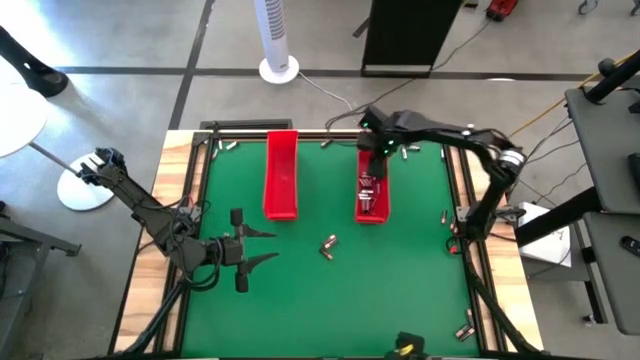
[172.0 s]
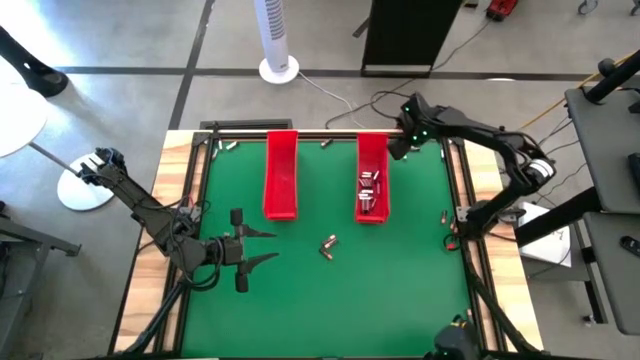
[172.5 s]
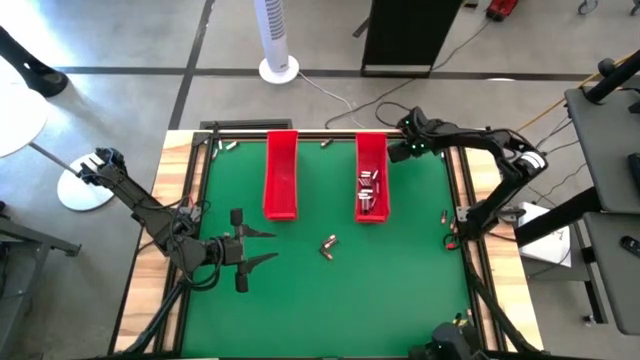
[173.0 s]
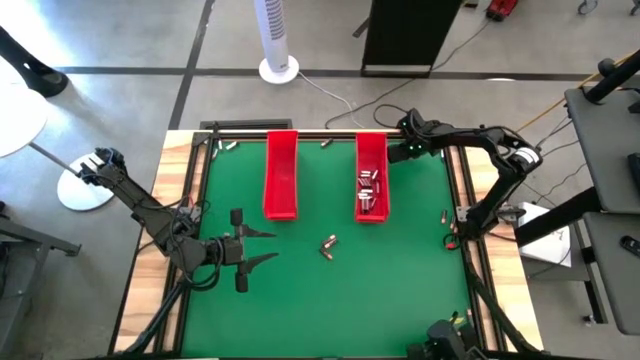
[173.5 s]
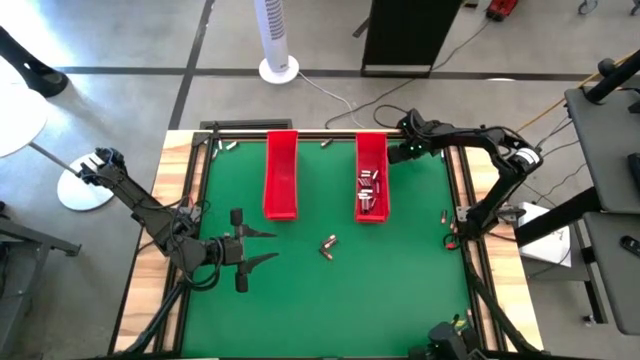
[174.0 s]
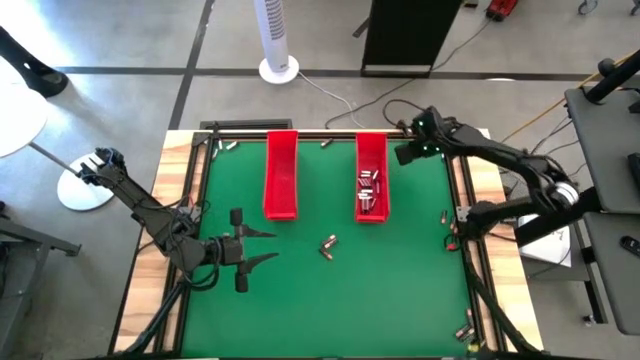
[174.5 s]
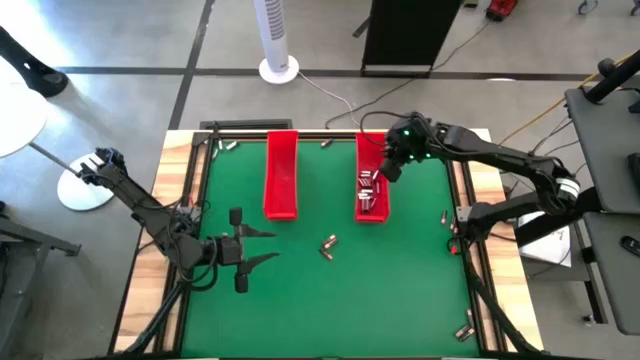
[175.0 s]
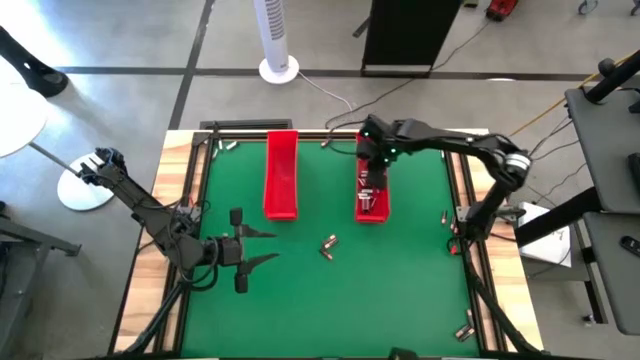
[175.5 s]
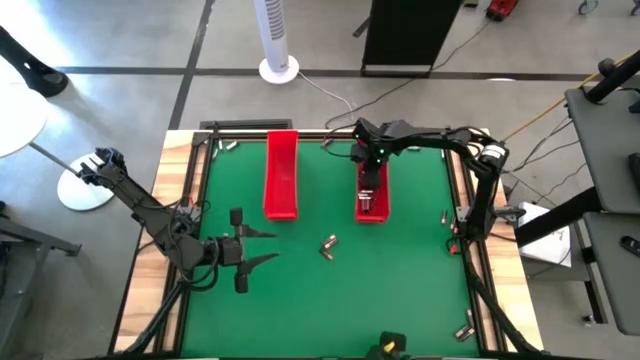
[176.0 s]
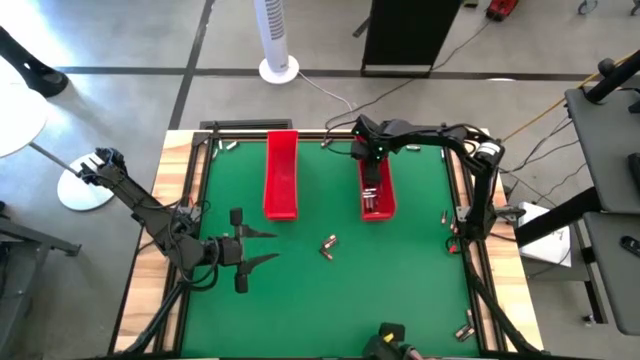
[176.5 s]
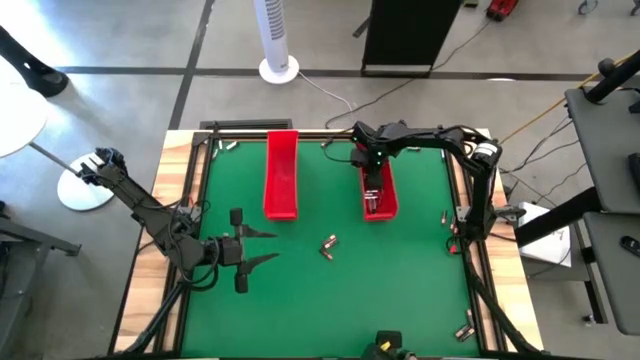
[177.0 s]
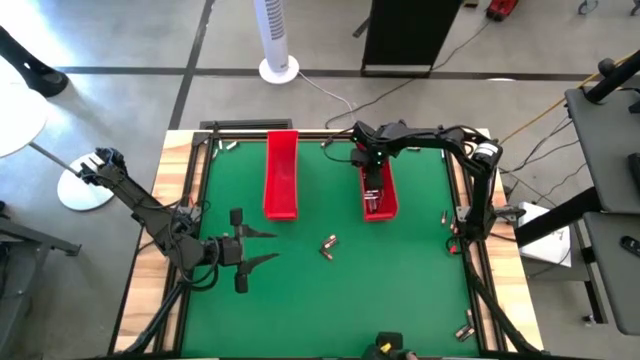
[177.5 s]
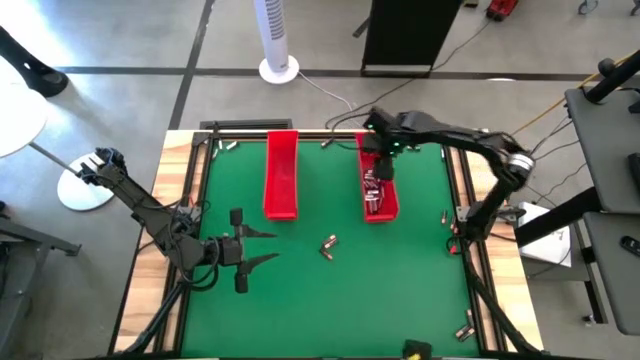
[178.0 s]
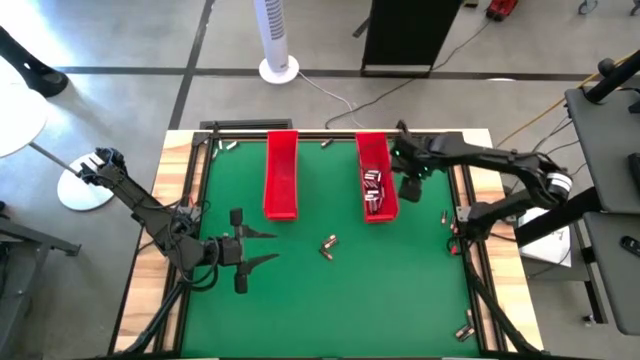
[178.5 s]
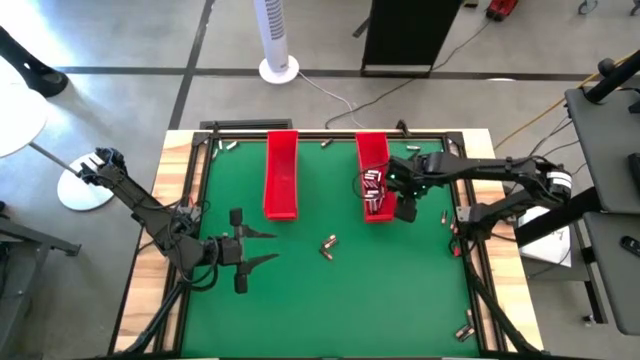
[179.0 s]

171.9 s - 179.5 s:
Task: Sort batteries
Put the silver battery into the right red bin

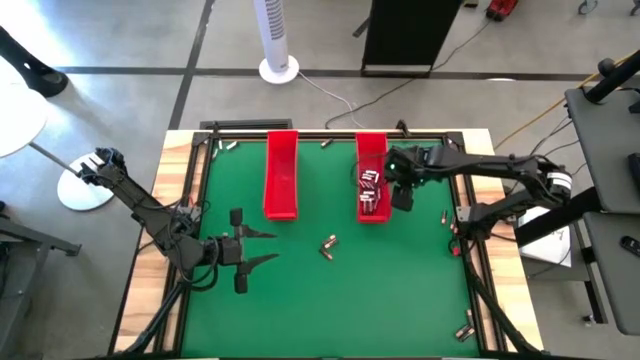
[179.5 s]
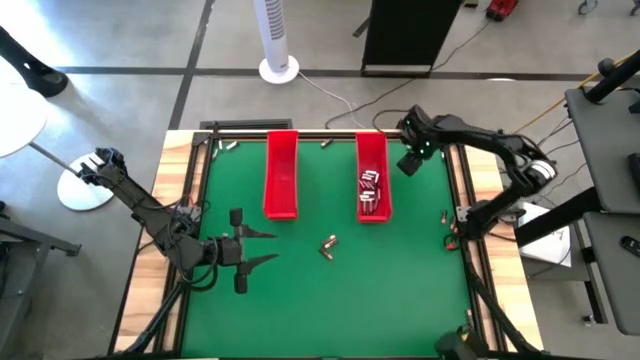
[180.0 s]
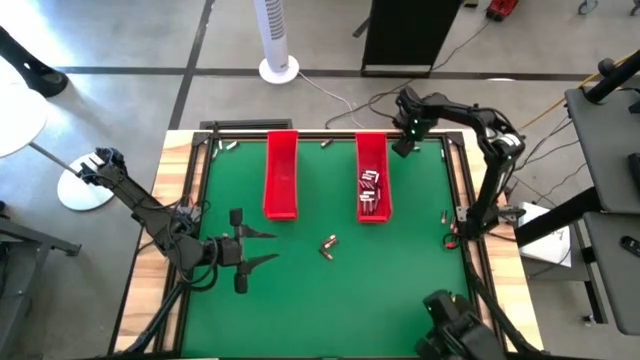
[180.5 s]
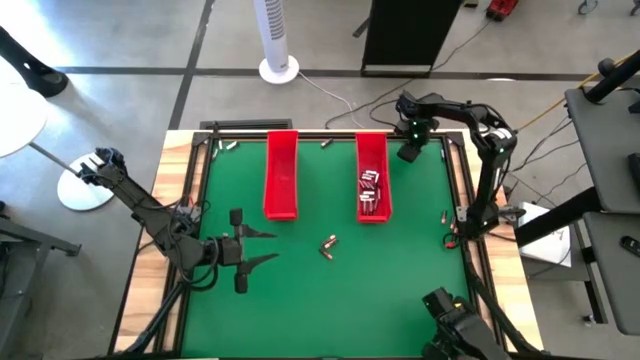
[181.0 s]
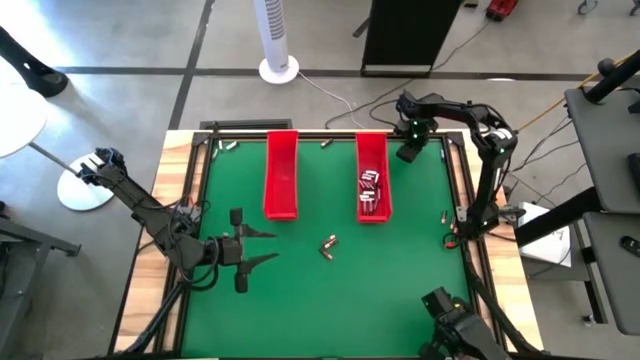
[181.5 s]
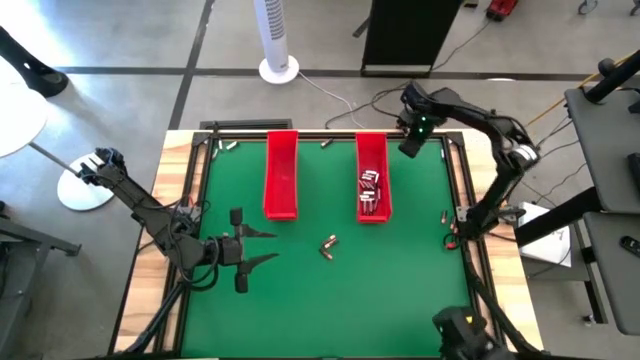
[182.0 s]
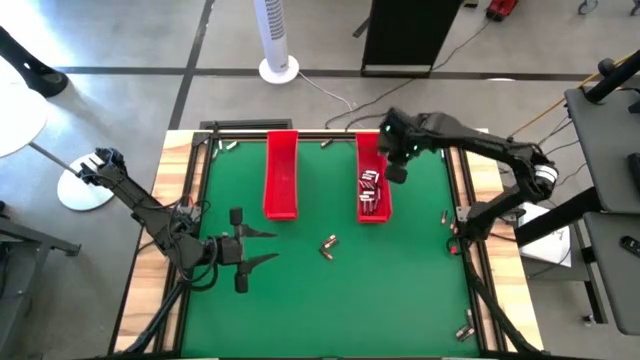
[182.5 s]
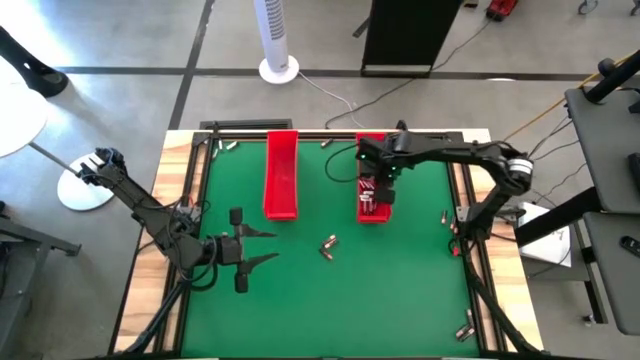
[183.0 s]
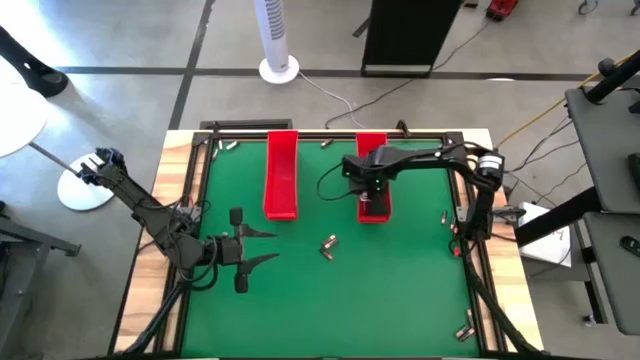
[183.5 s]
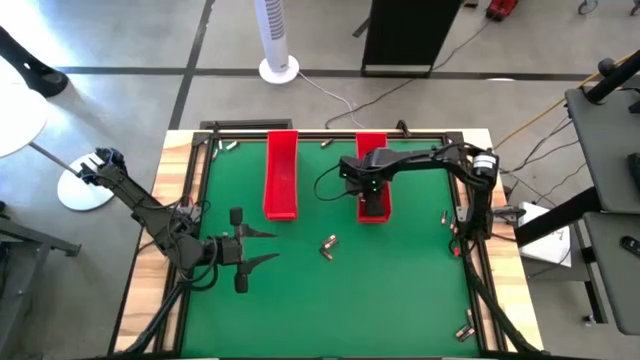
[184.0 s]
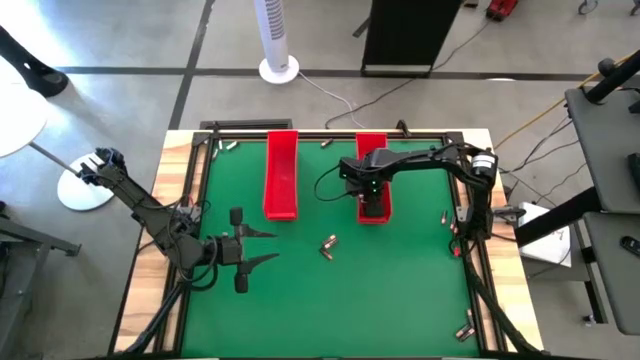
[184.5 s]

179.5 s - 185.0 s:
Put the silver battery into the right red bin

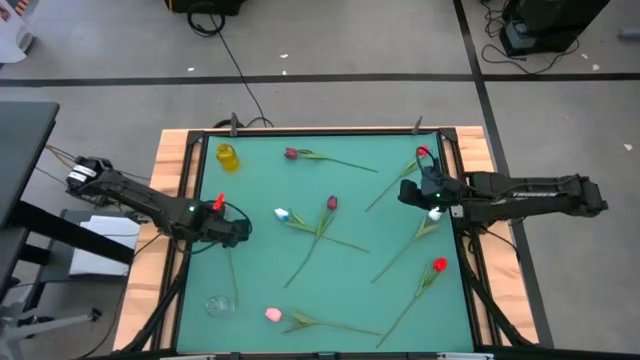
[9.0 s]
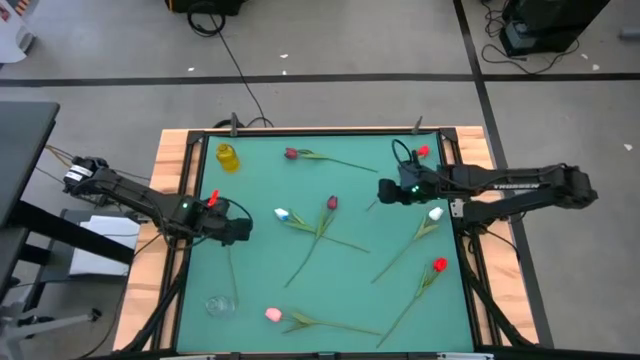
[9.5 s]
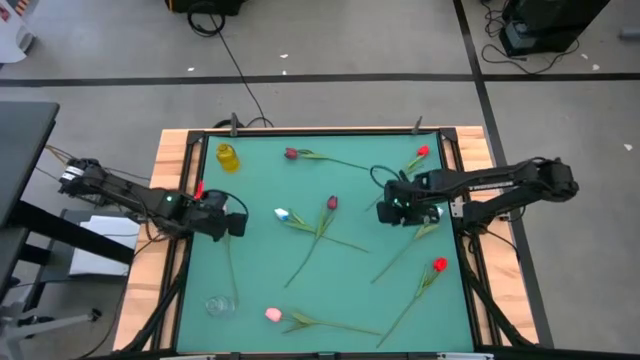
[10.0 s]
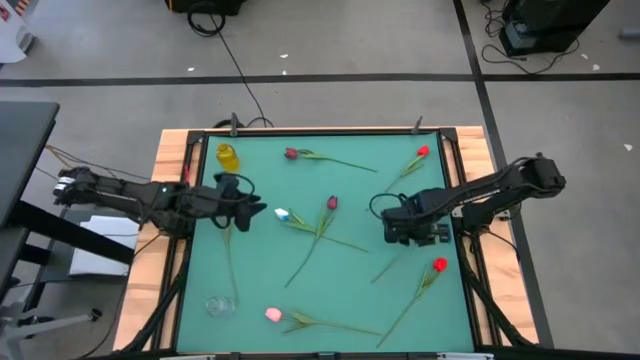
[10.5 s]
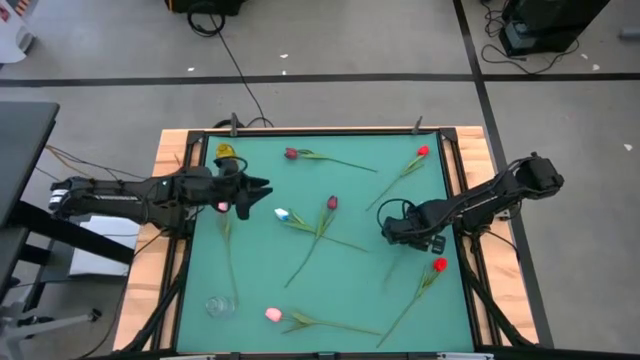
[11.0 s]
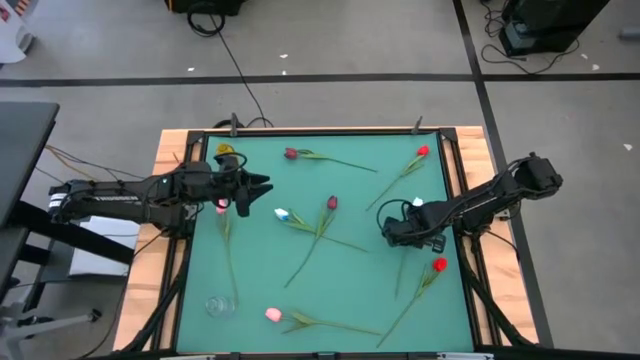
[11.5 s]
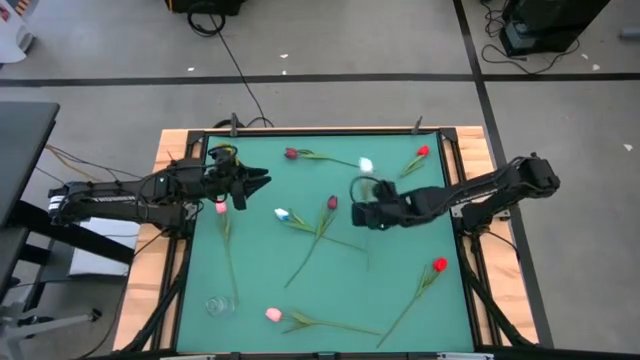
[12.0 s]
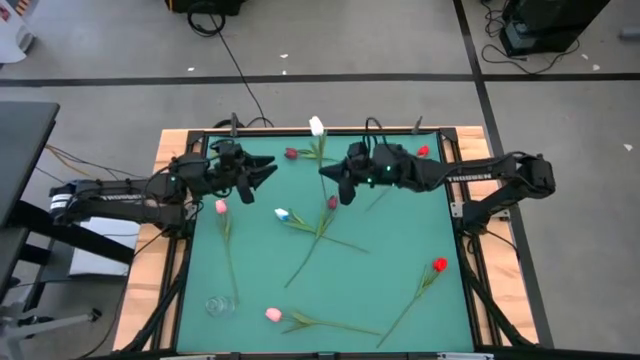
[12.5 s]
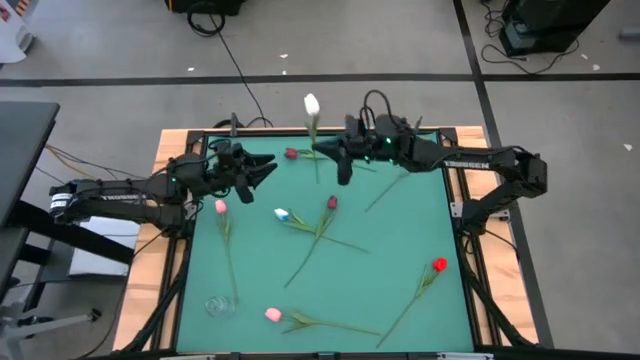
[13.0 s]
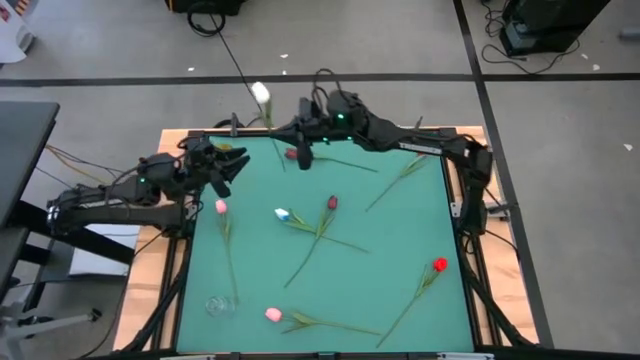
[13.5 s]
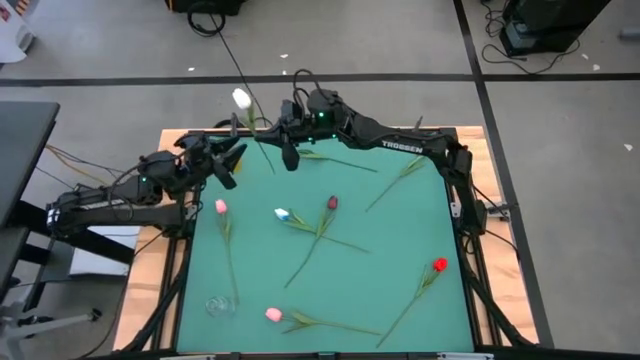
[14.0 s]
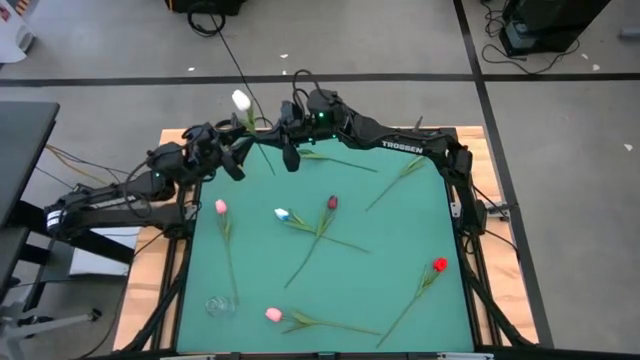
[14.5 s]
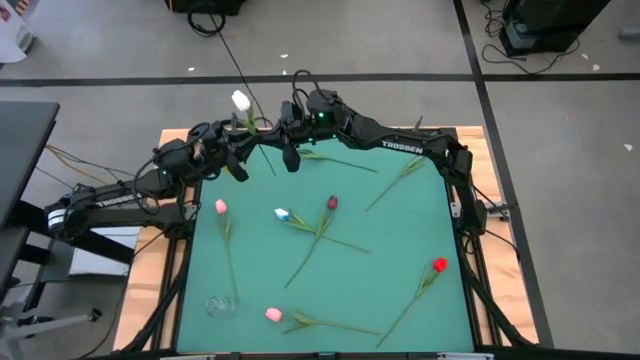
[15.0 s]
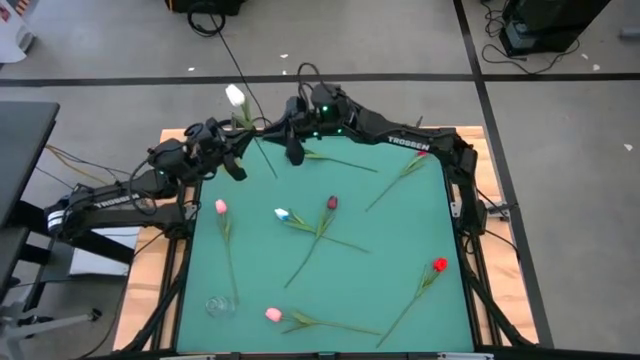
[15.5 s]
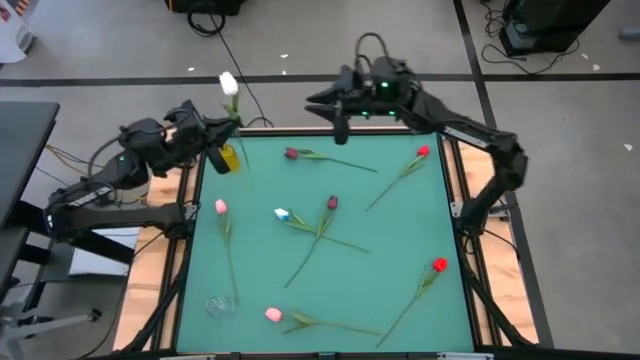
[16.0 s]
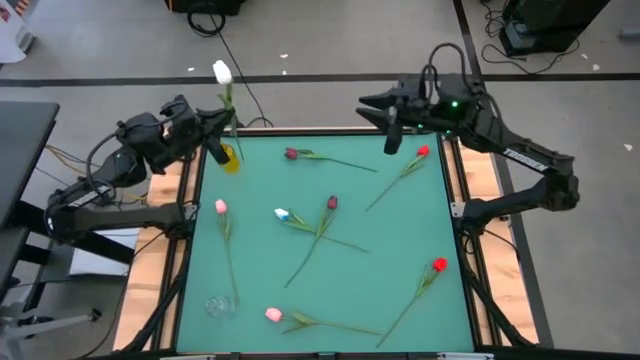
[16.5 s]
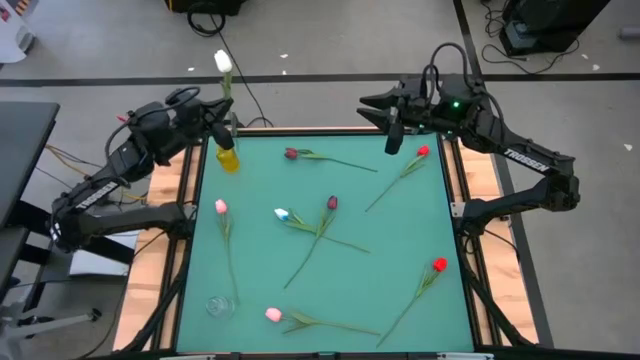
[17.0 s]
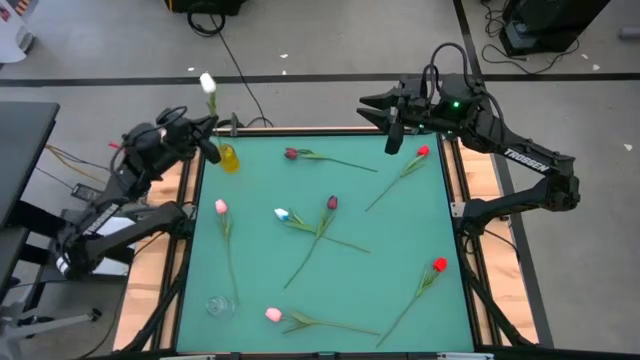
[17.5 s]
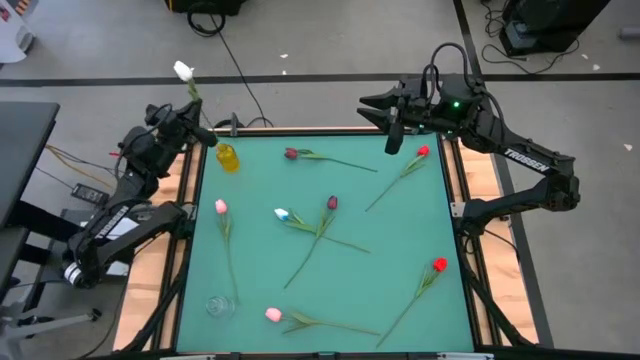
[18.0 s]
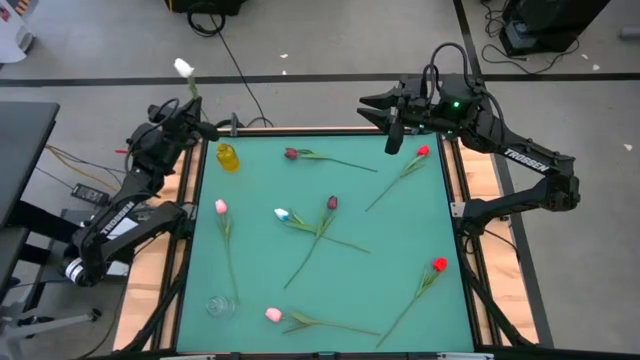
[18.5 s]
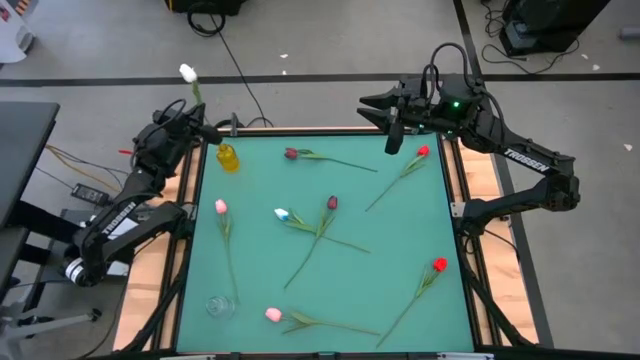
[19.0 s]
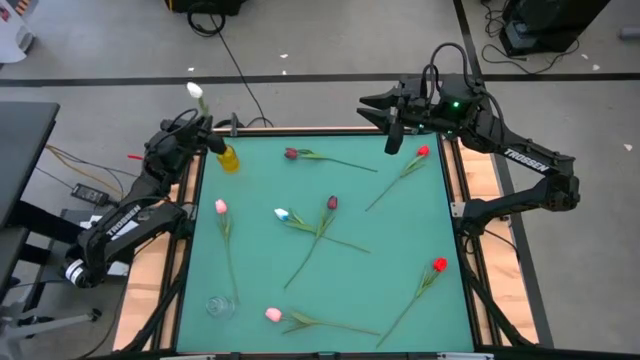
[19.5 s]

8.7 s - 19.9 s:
Task: Sort flowers into vase by color
Put the right white flower into the yellow vase
